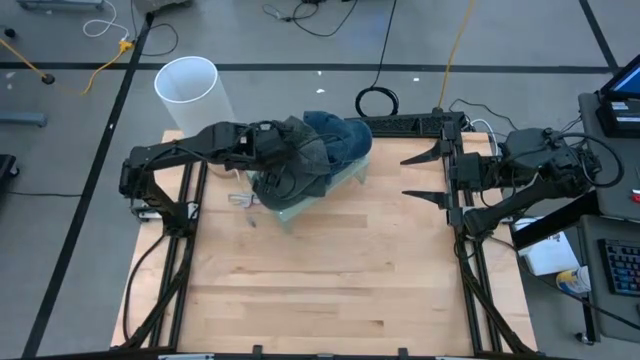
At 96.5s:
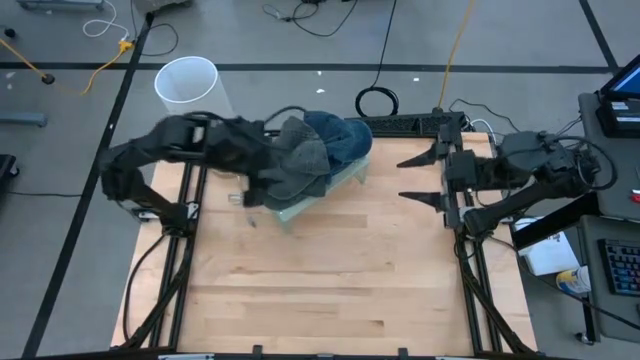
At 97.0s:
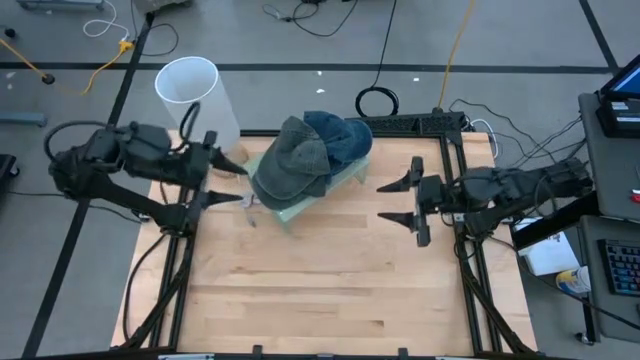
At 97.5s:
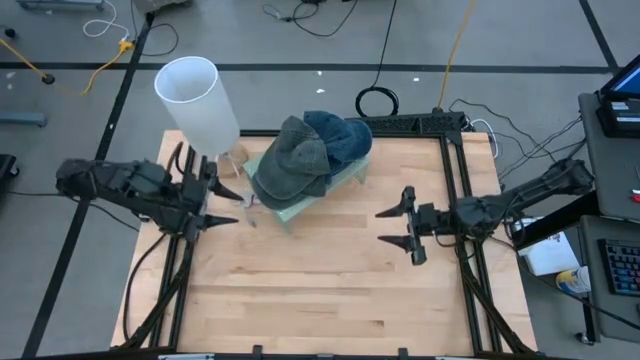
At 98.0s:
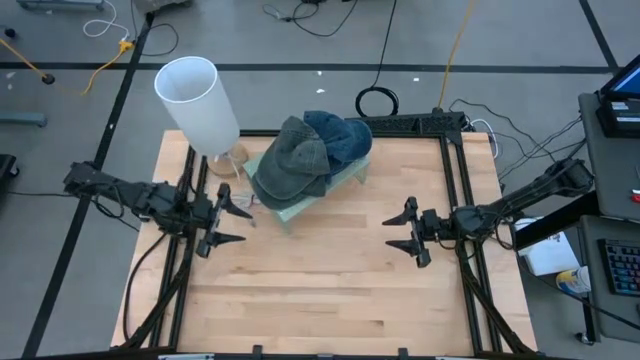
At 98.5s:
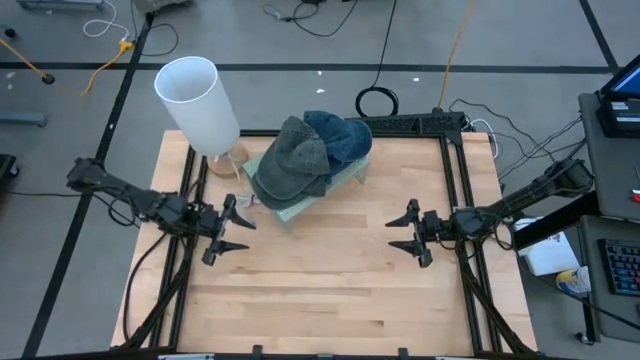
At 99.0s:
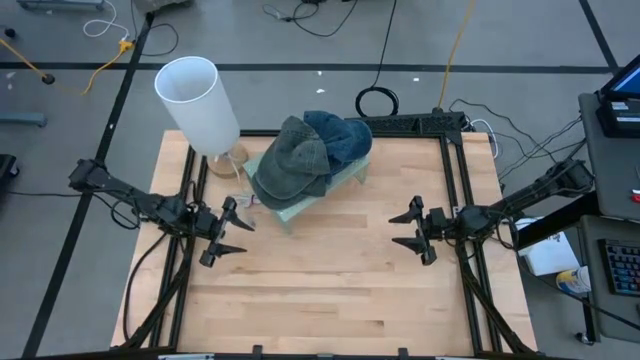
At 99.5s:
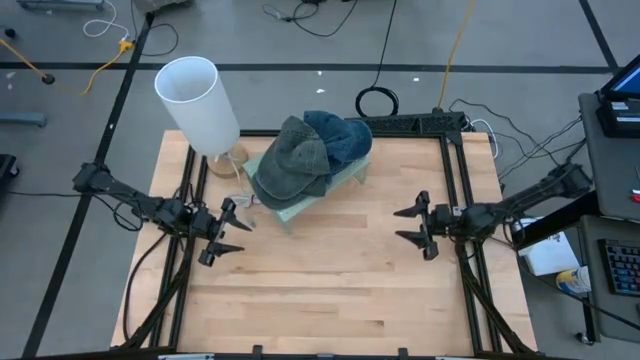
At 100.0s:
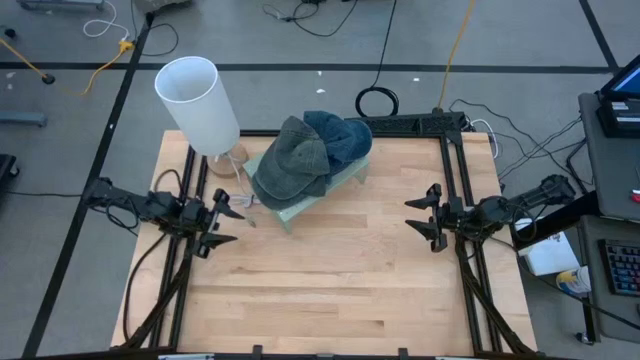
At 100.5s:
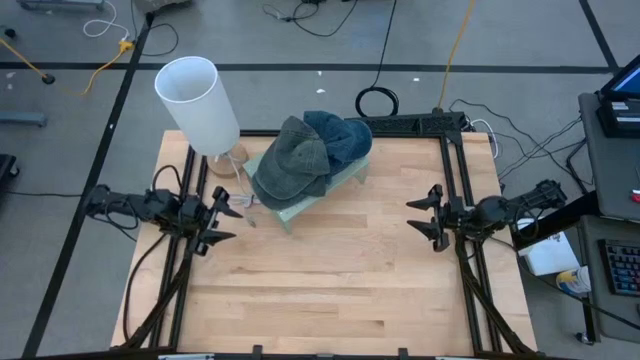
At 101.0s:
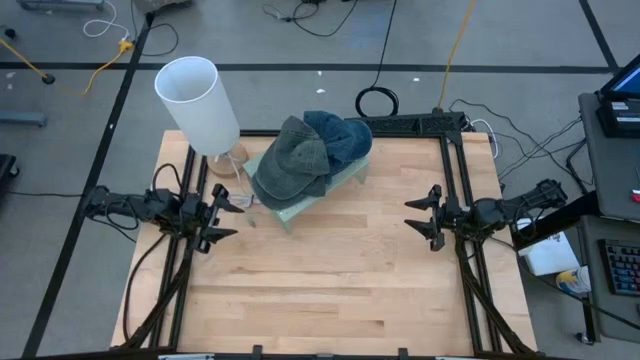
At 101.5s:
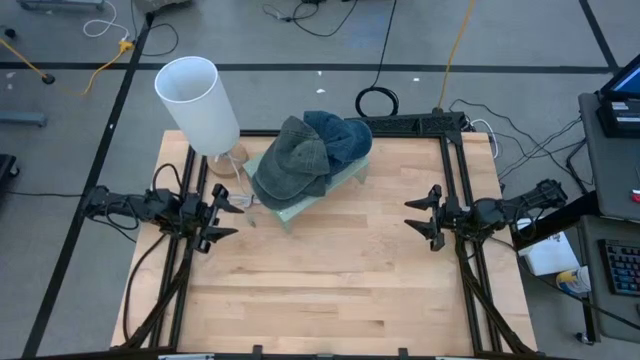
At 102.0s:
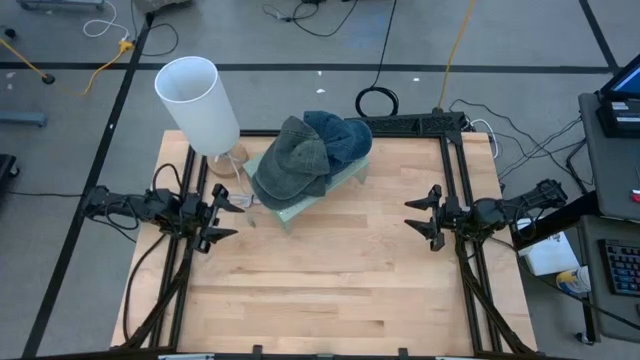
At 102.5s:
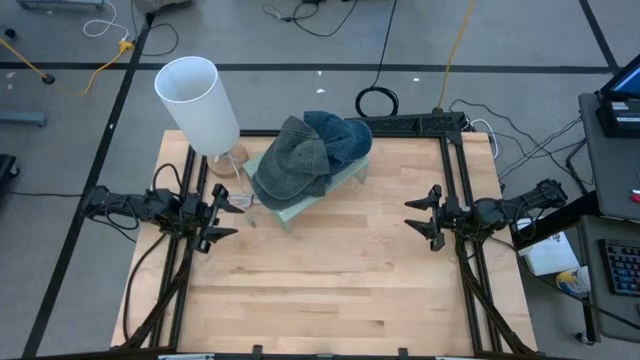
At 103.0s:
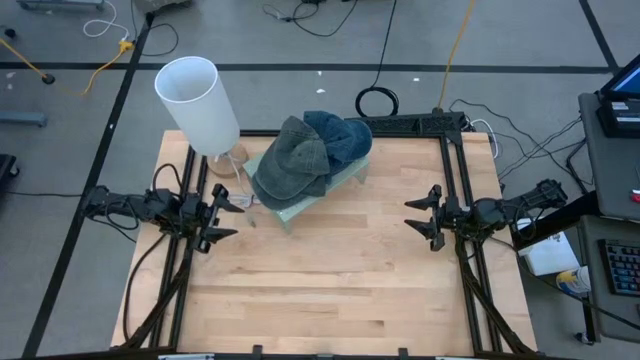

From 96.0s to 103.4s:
Task: Pick & Place hat
Return to Home Position

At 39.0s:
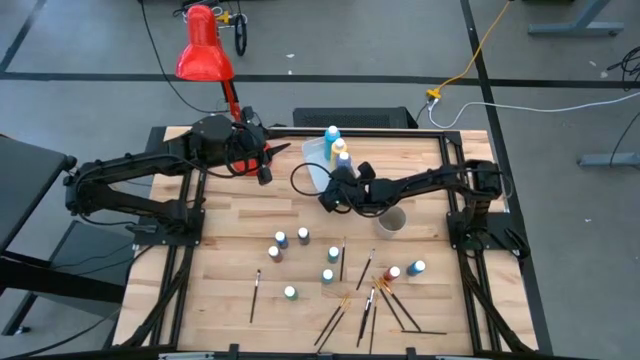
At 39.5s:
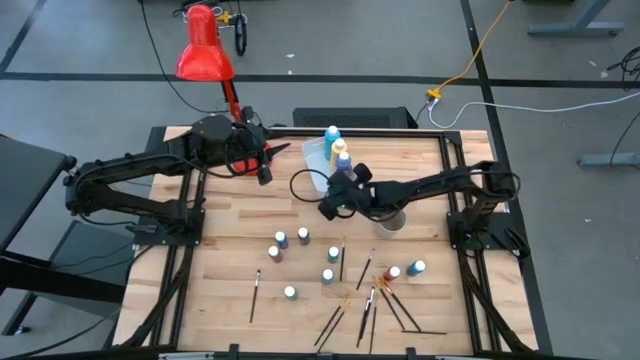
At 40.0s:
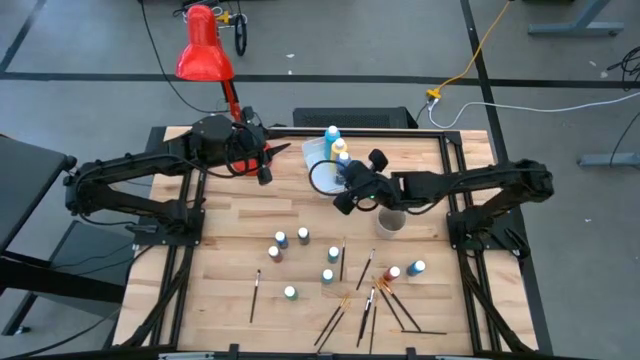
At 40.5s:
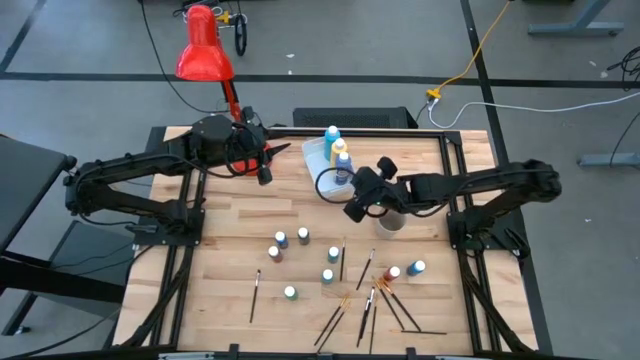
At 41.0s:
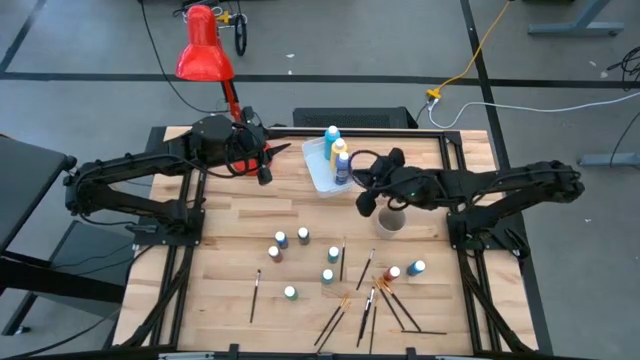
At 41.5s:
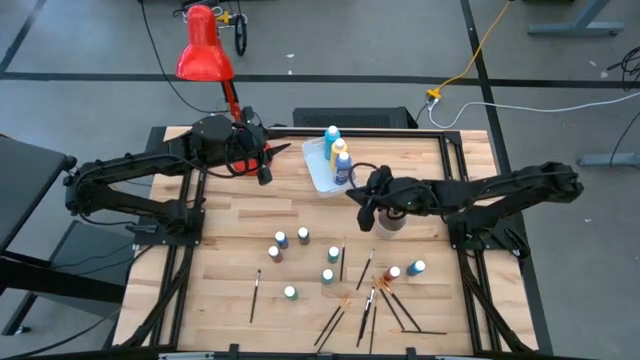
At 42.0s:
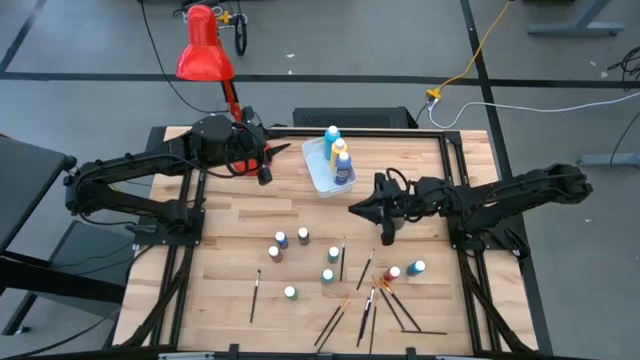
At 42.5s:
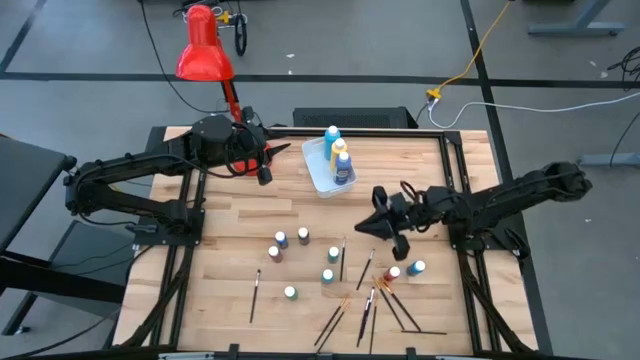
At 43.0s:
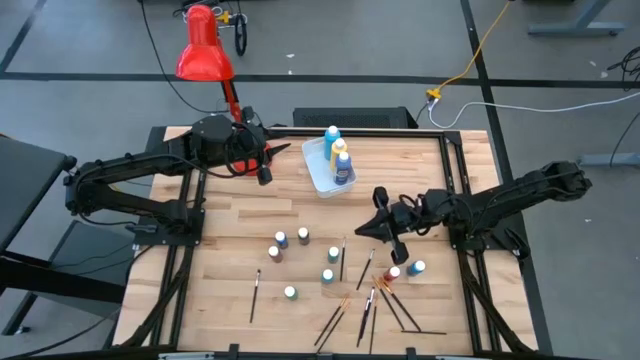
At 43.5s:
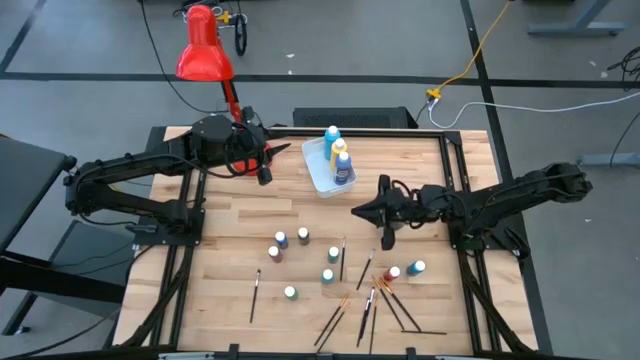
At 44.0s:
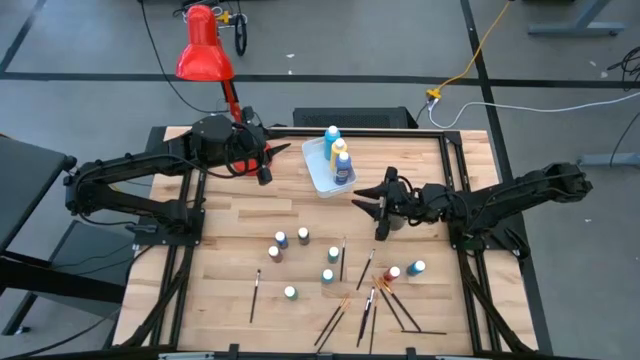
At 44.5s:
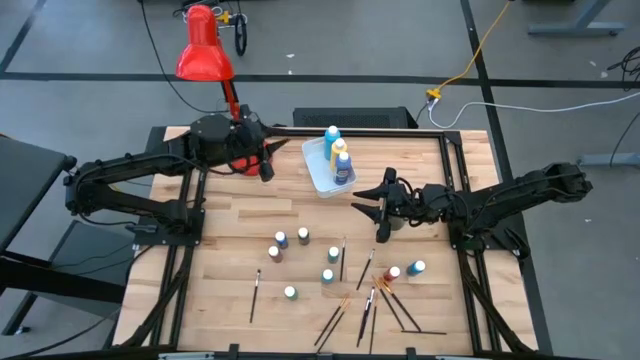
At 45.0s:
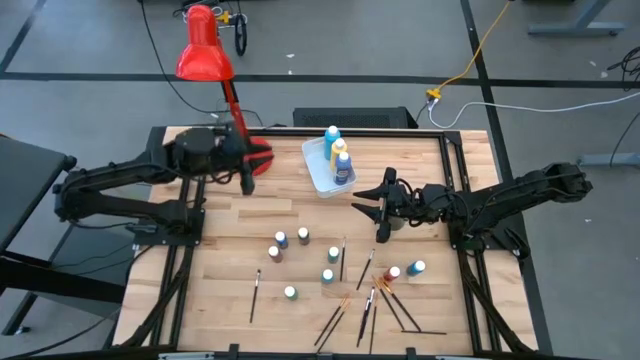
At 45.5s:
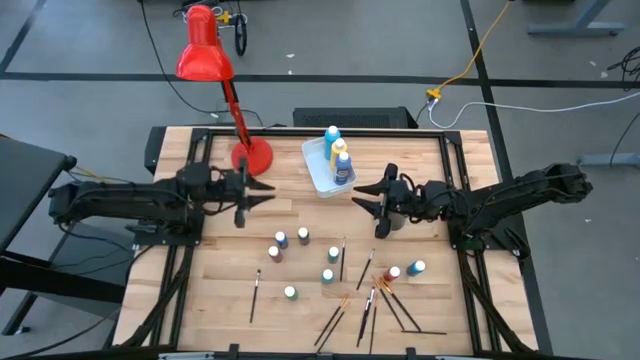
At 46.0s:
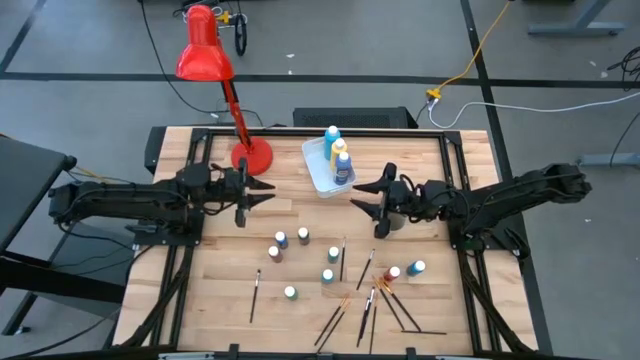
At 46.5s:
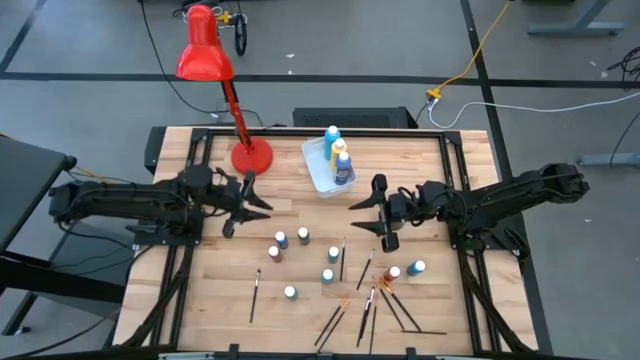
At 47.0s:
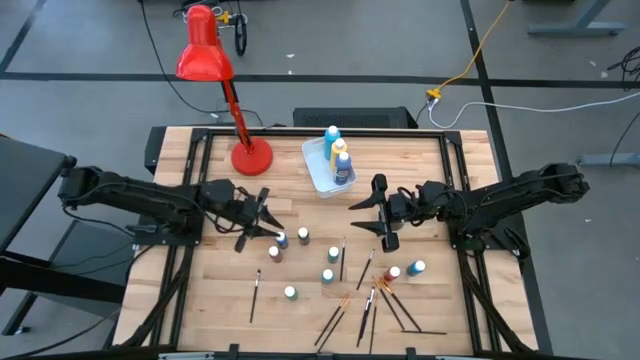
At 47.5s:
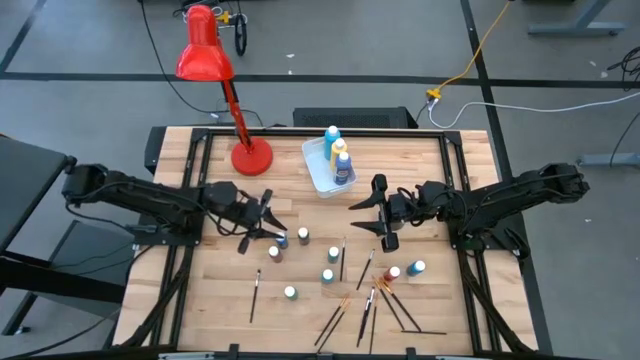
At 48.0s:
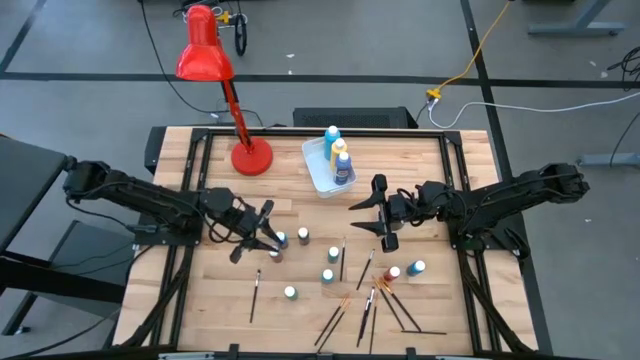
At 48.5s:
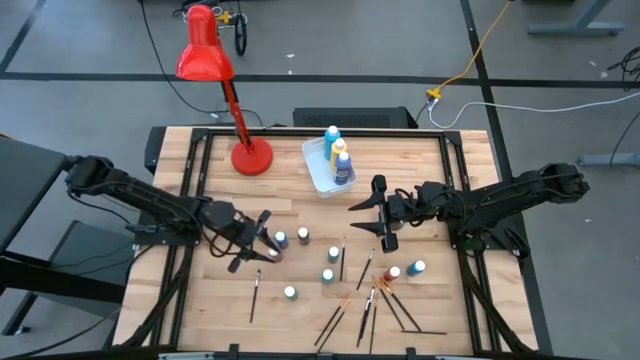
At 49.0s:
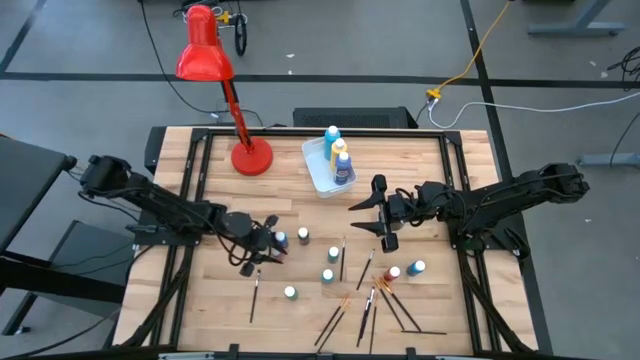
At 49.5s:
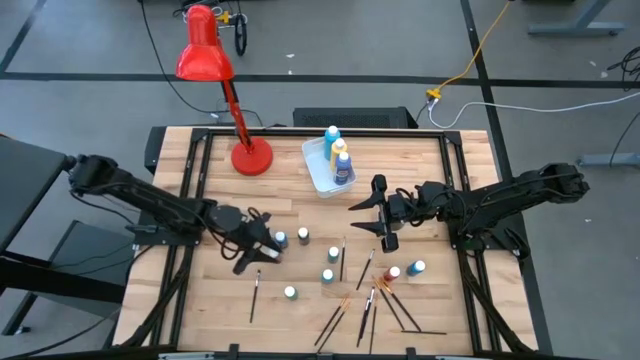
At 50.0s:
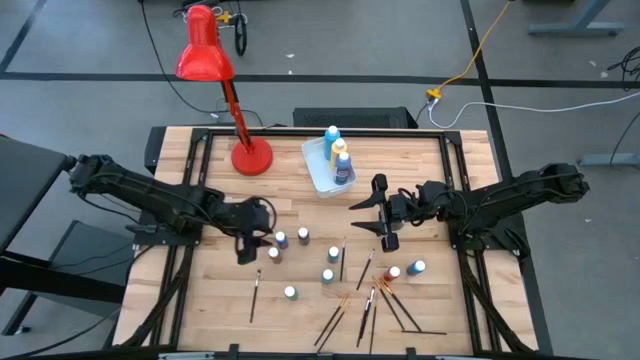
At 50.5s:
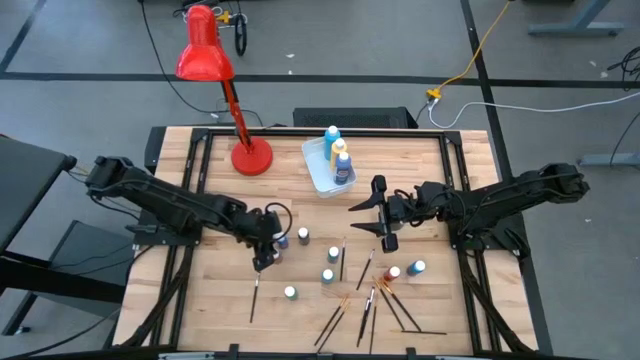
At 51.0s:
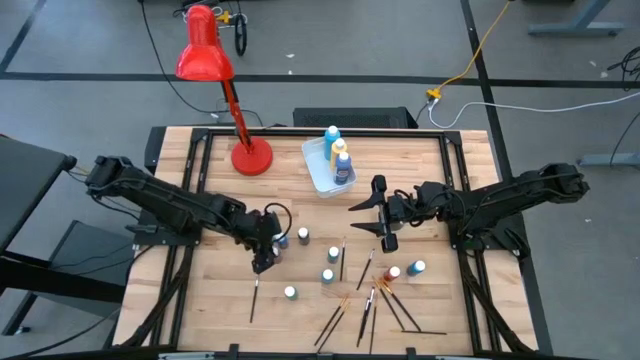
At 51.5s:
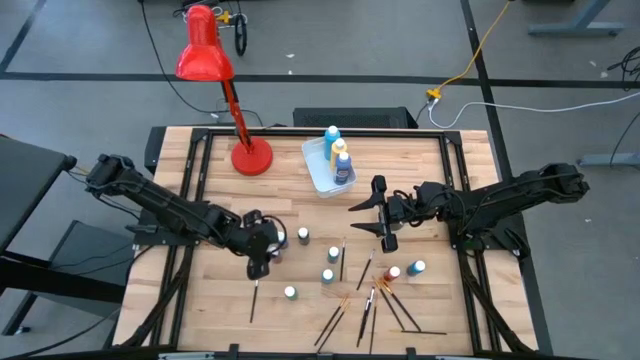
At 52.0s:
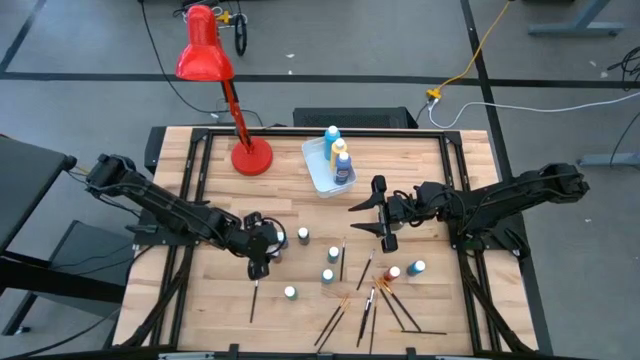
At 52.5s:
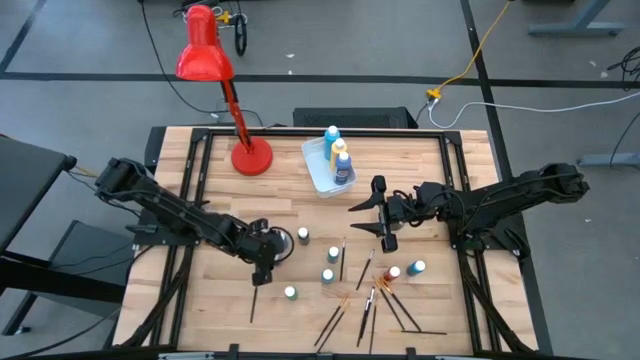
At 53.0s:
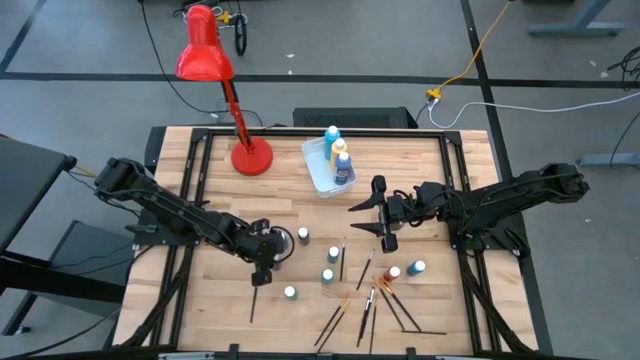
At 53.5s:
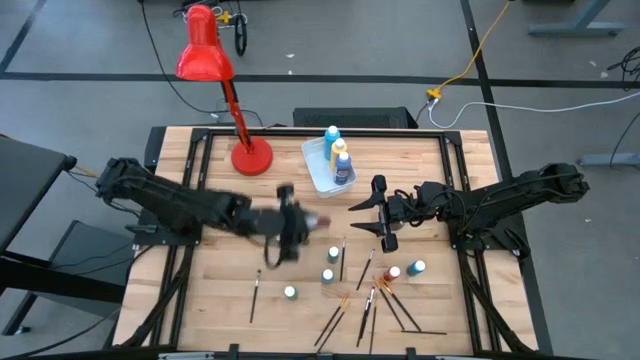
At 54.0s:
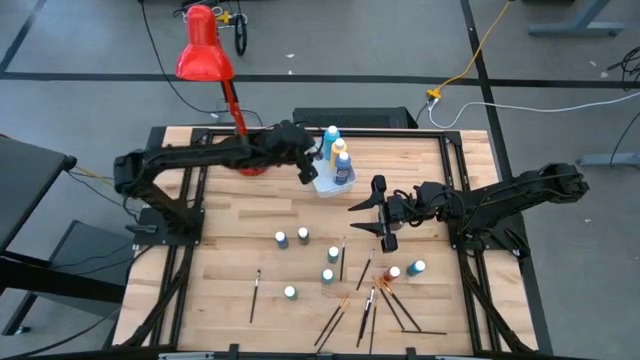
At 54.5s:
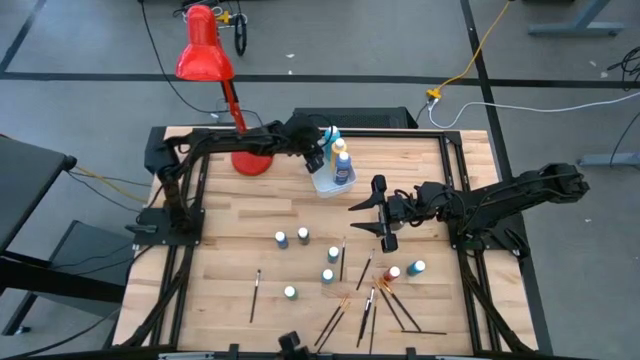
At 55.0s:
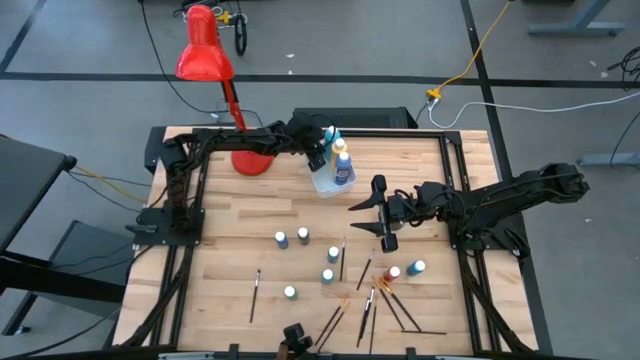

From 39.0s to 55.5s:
Task: Pick & Place Paint Supplies
Put the small red paint bottle into the white bin
